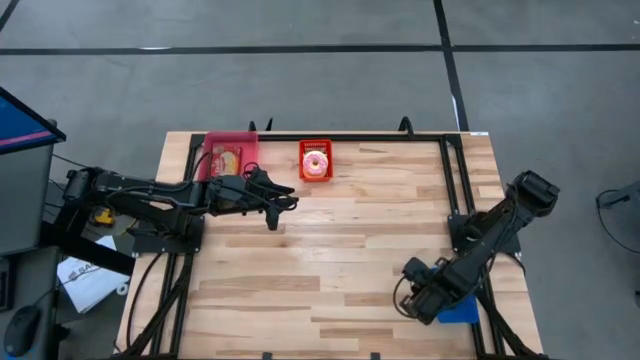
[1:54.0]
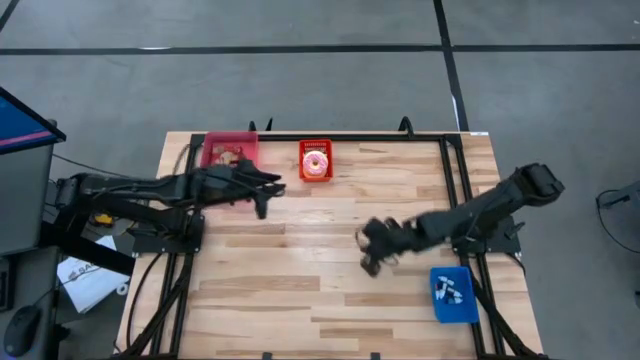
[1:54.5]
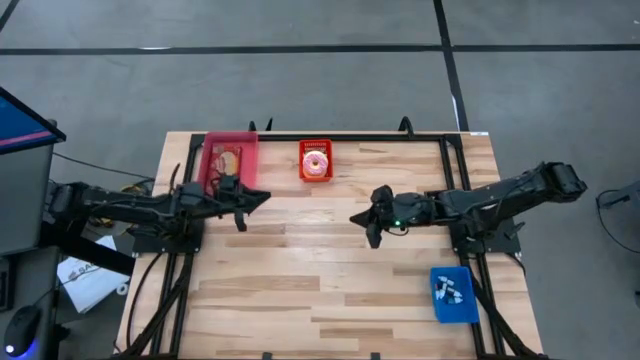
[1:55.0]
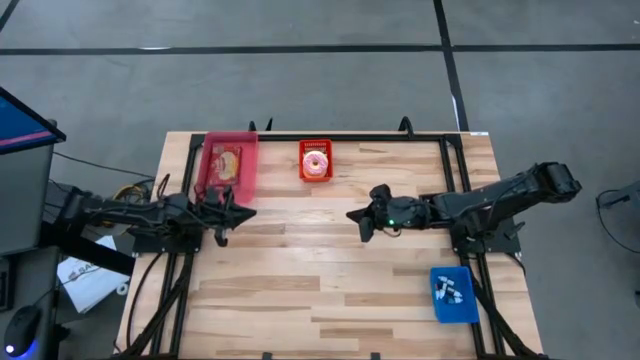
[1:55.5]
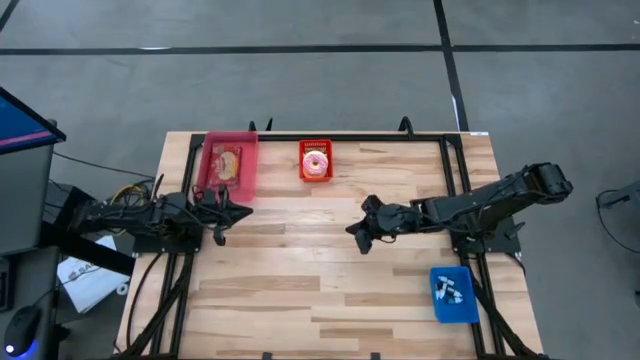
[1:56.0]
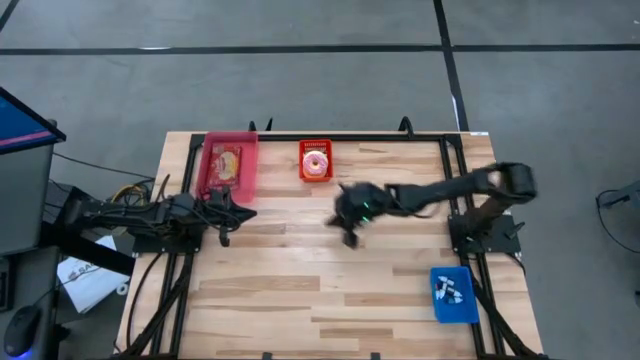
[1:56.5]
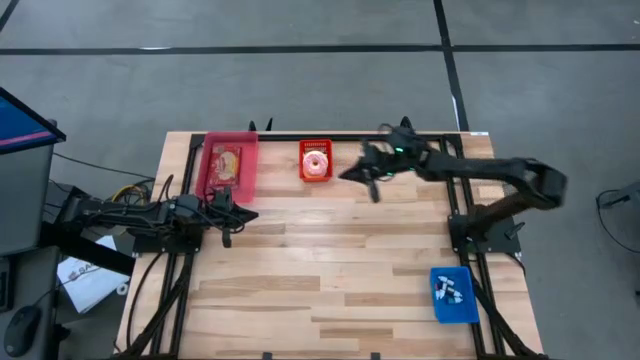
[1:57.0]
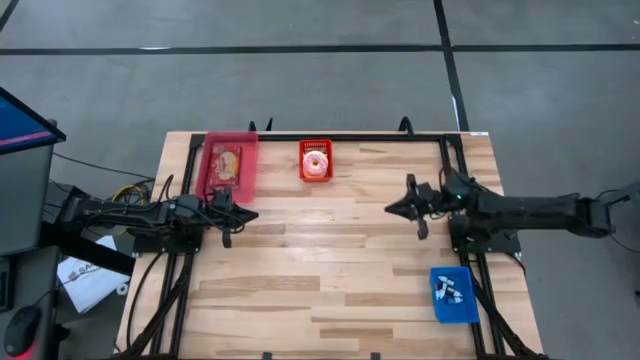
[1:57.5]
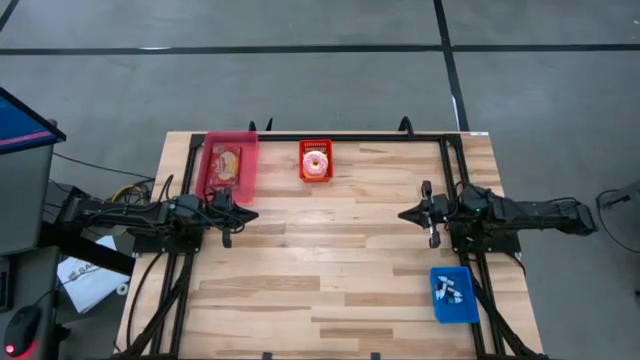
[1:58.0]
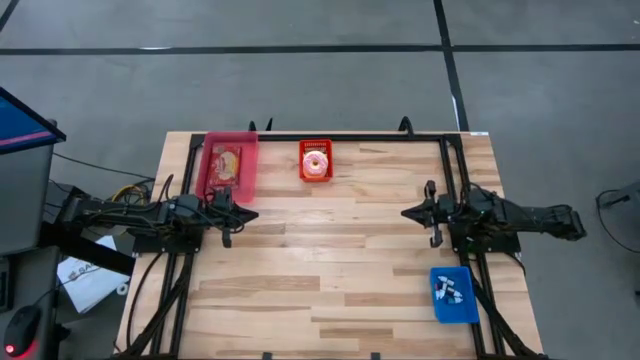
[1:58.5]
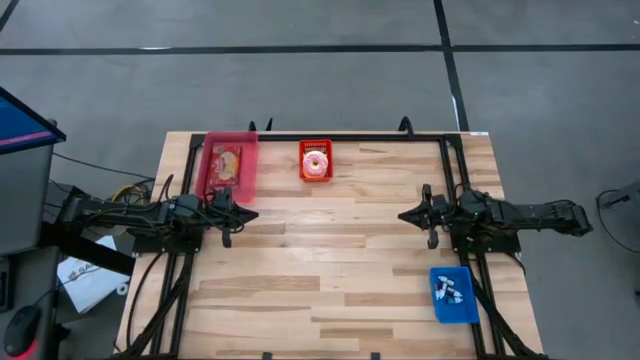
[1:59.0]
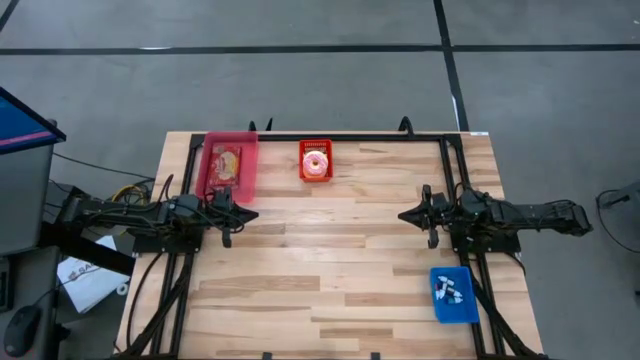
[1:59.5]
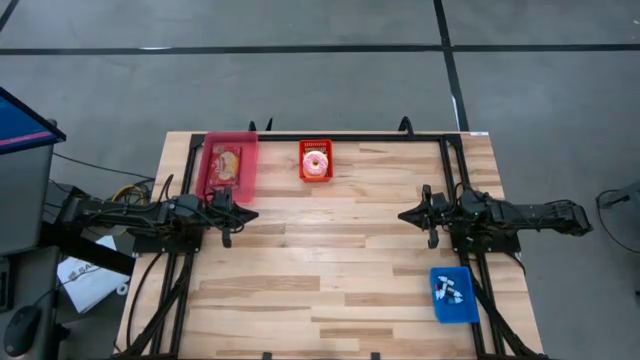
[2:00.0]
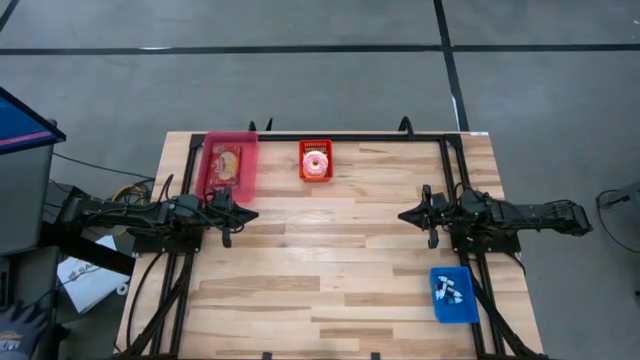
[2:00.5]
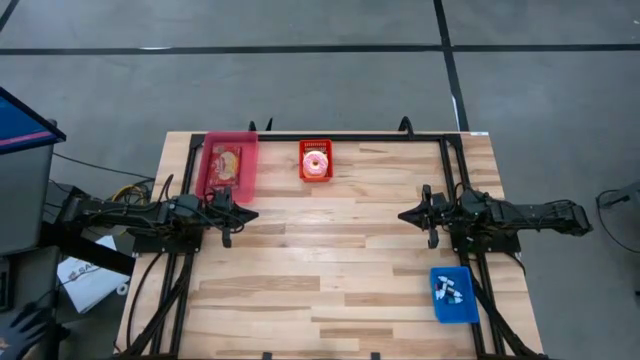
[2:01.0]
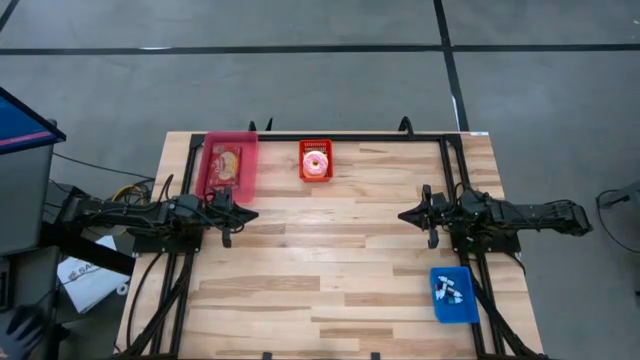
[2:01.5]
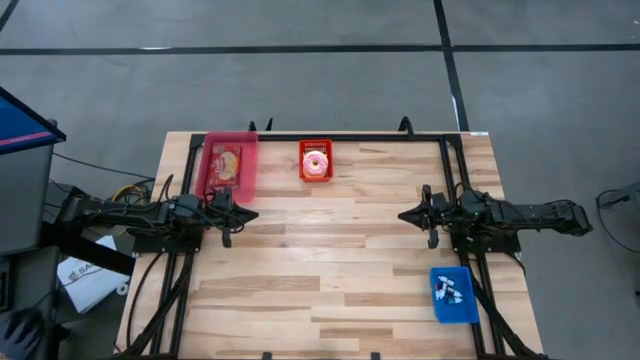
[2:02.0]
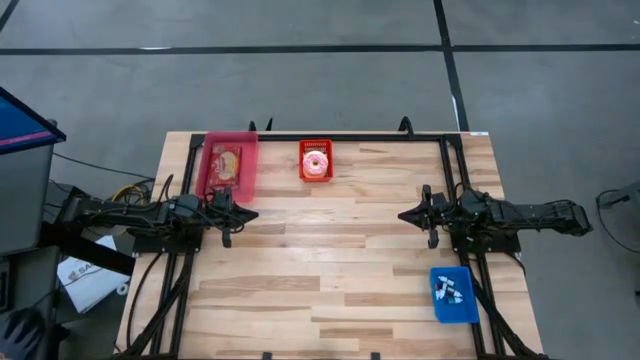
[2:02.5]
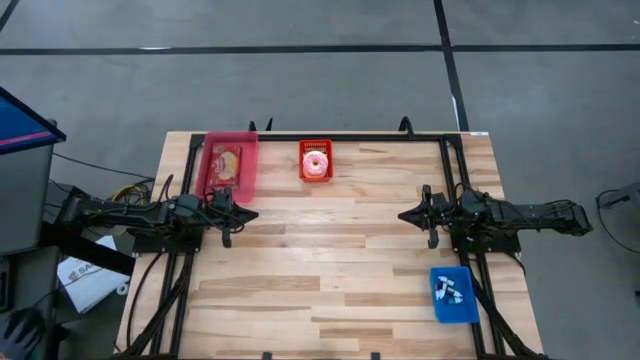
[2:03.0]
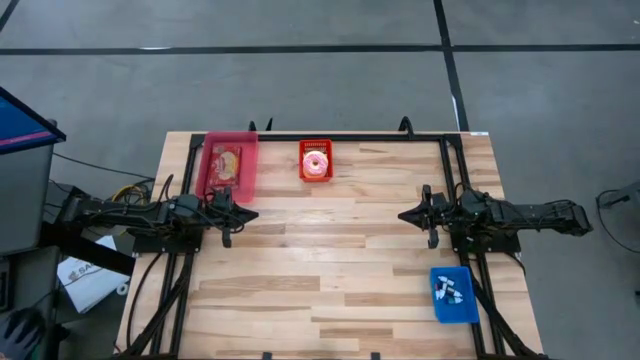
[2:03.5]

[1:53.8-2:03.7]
Return to Home Position

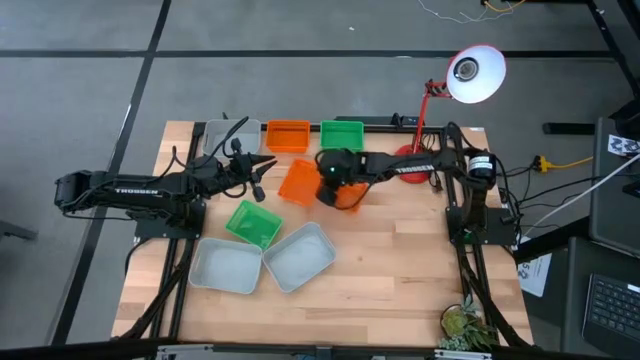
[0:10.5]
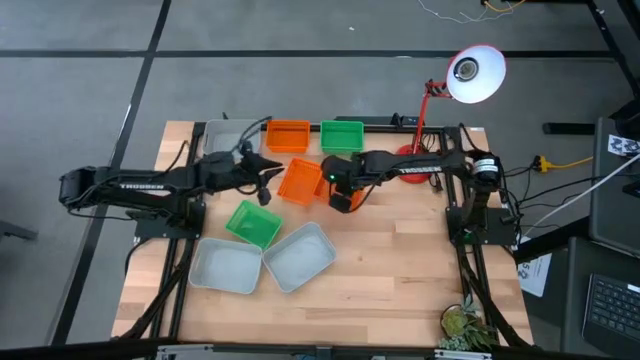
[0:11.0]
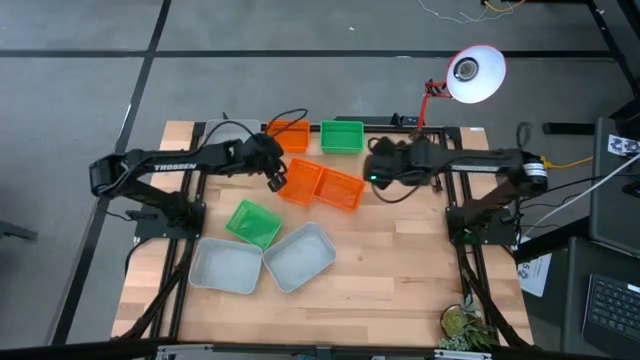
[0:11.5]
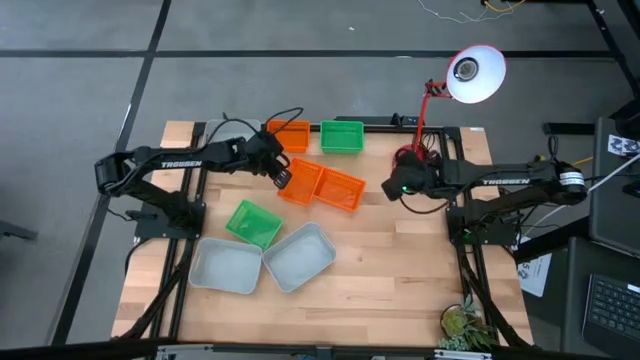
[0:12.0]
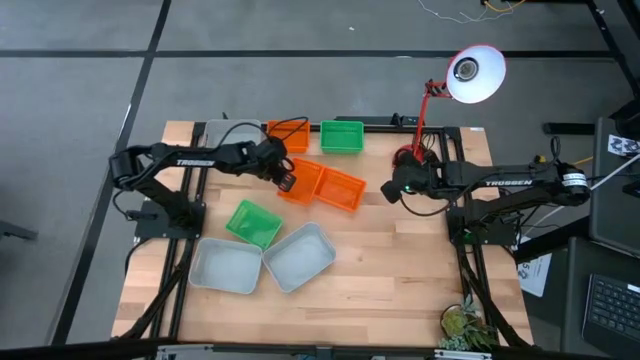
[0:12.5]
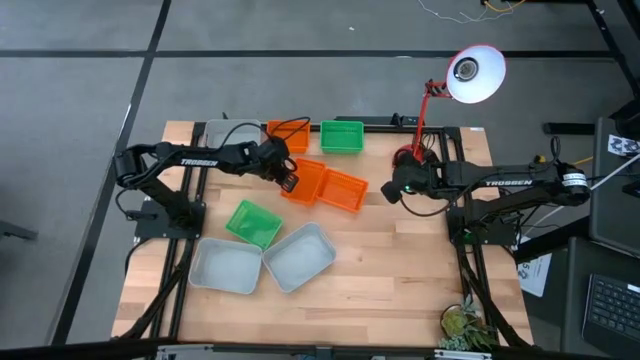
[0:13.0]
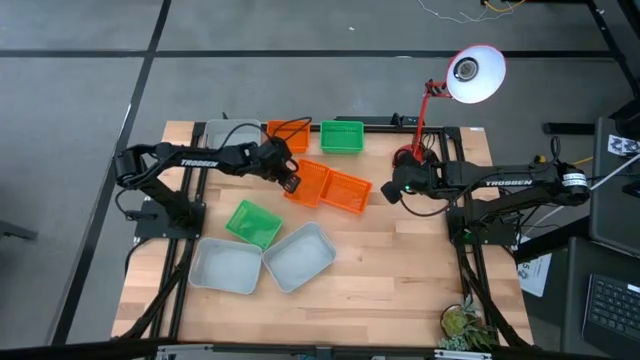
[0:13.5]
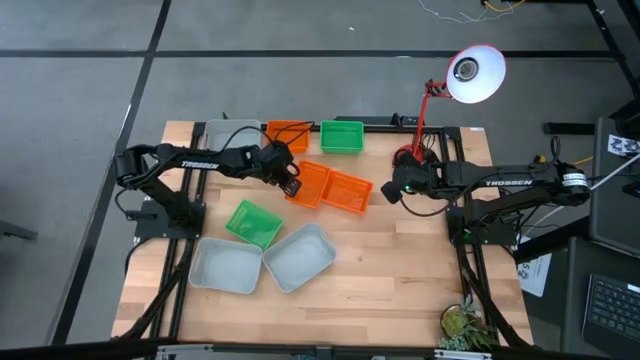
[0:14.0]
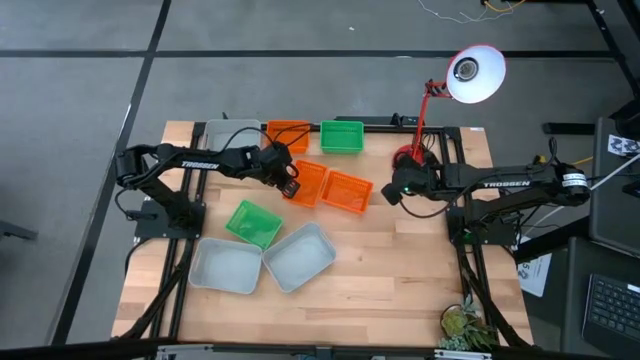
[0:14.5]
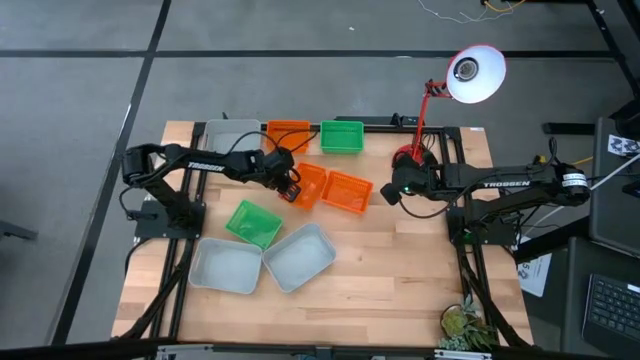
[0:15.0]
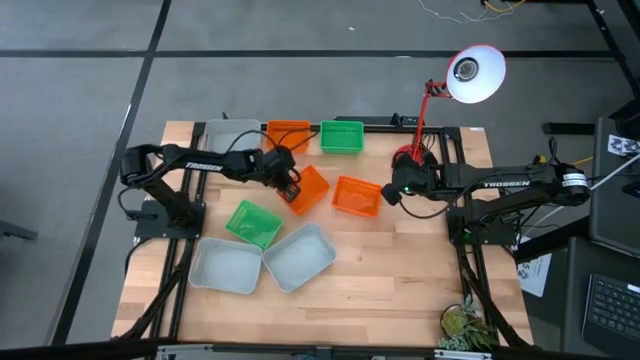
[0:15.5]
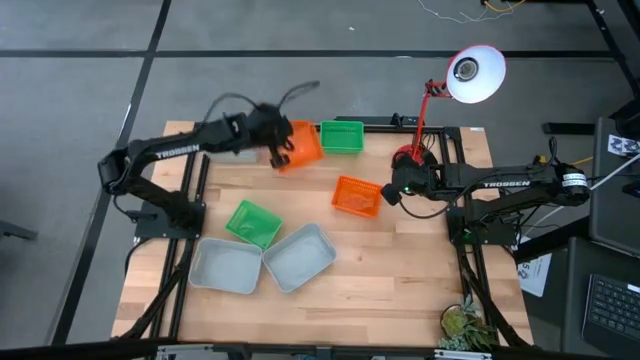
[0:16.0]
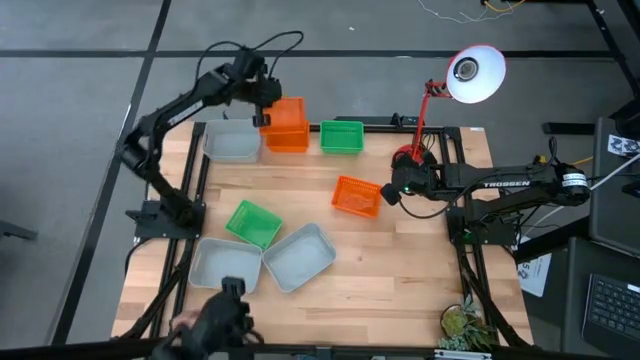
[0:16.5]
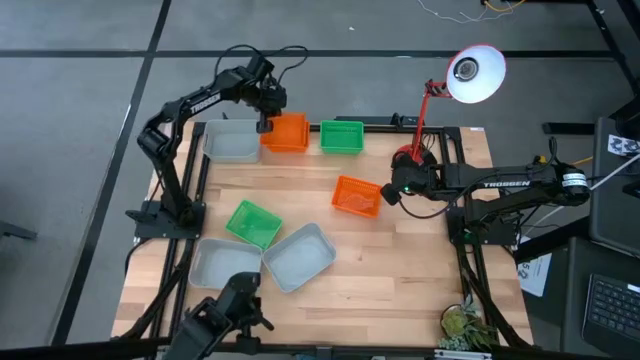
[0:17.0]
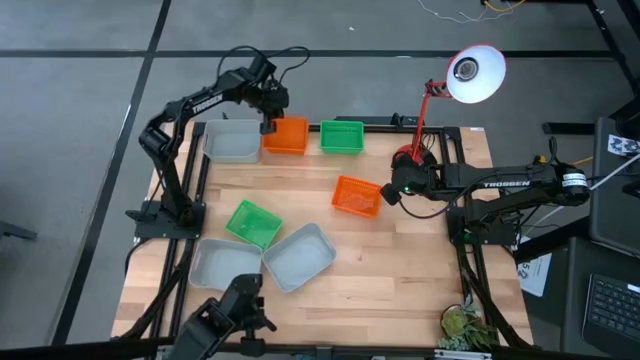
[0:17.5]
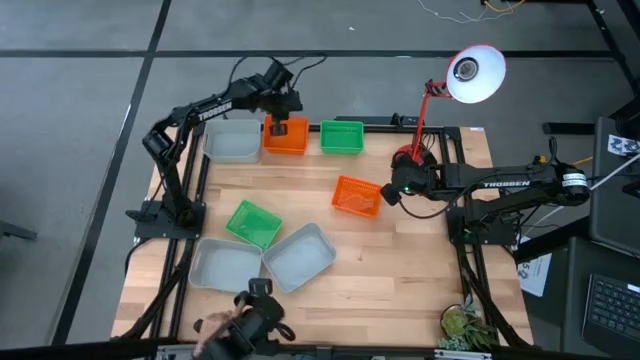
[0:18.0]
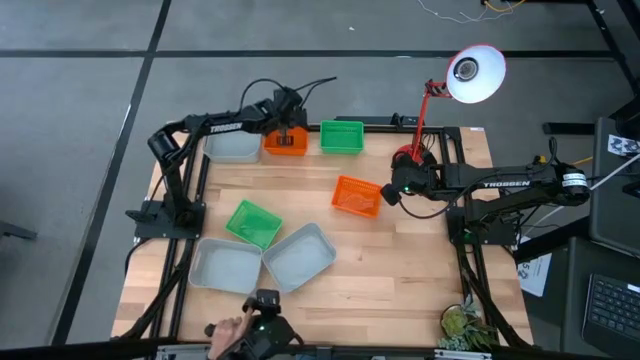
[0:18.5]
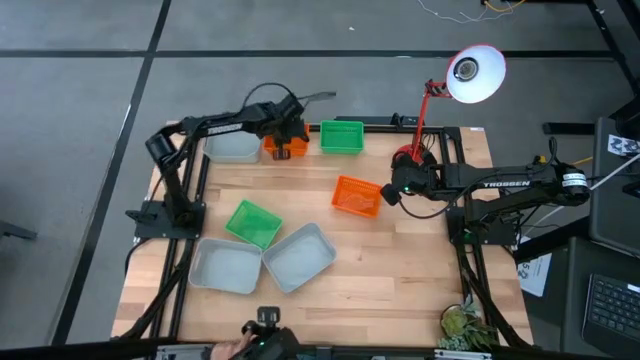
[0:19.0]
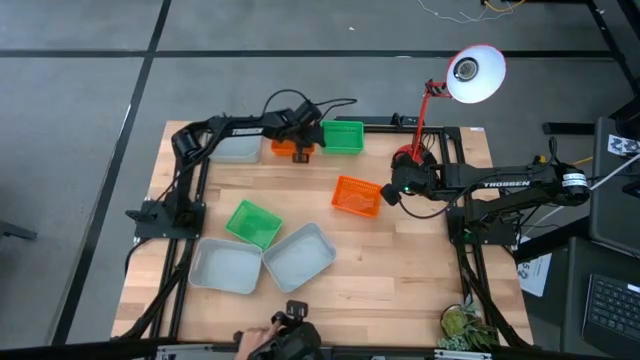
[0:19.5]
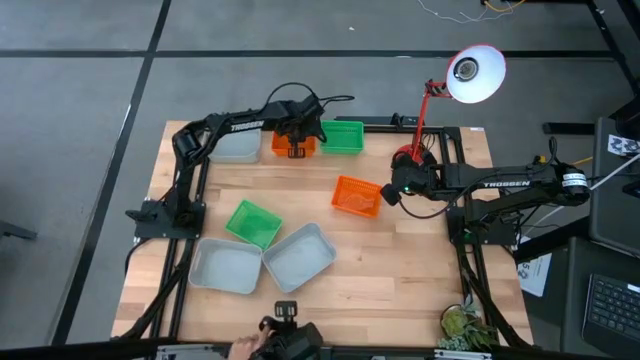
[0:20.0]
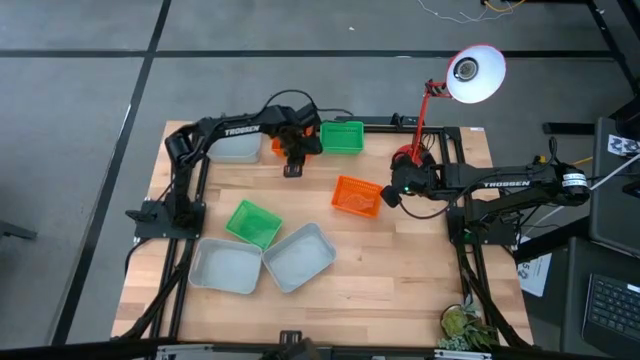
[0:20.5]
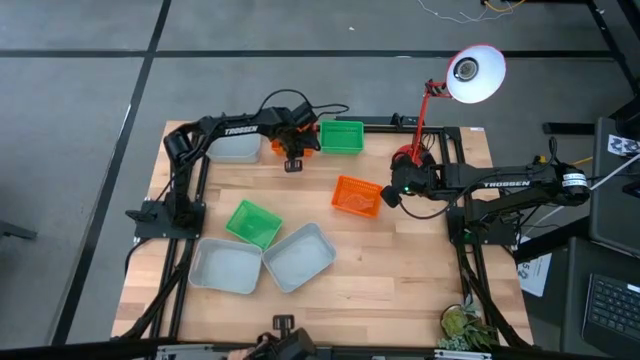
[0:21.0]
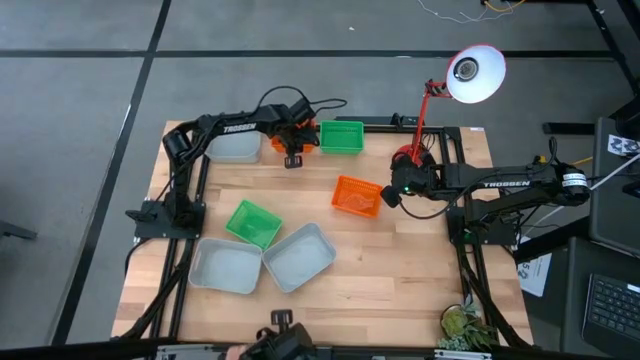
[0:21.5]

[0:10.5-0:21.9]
Stack the left orange bin on the top orange bin
